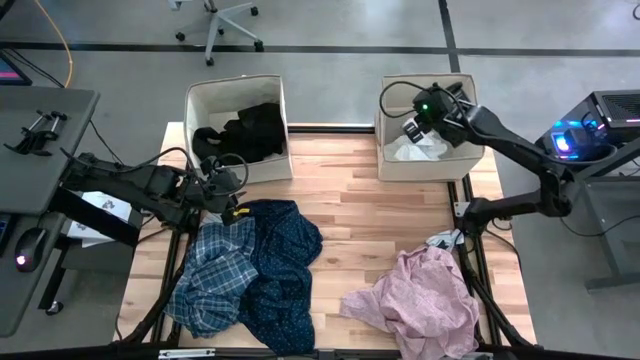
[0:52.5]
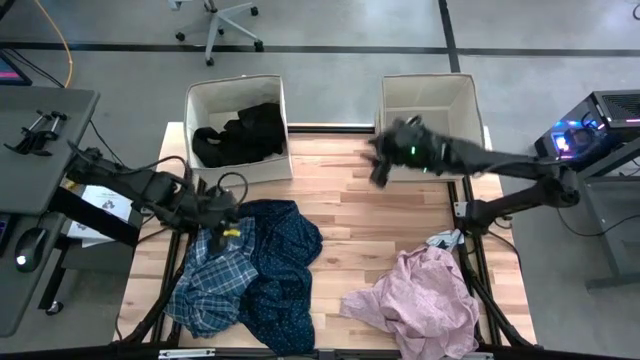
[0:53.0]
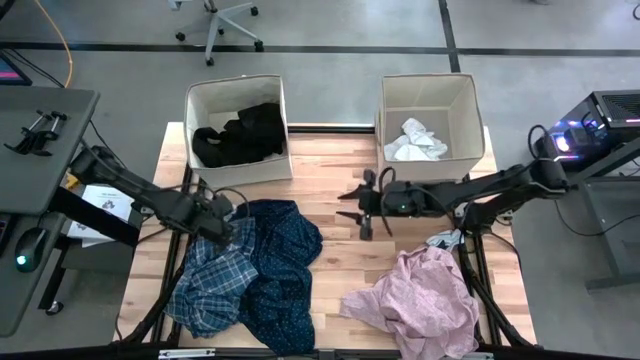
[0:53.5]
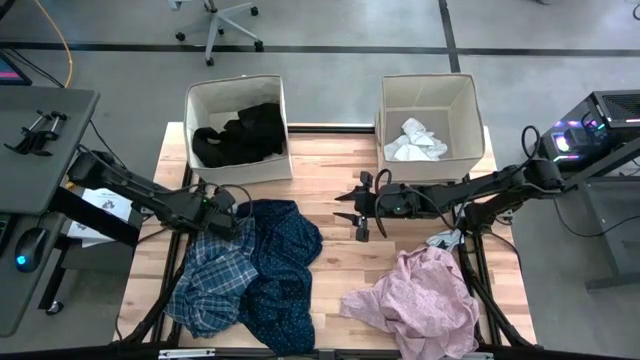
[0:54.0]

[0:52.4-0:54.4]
Task: Sort clothes
Put the left white stripe sock into the right laundry bin

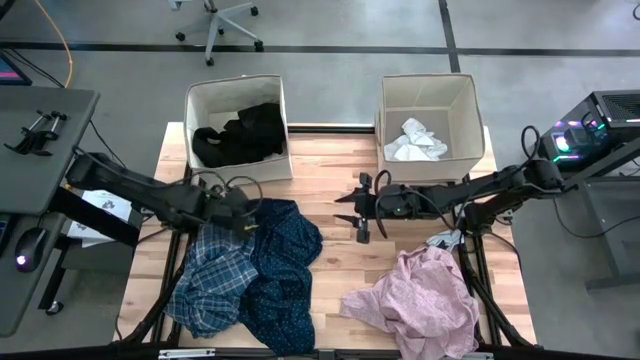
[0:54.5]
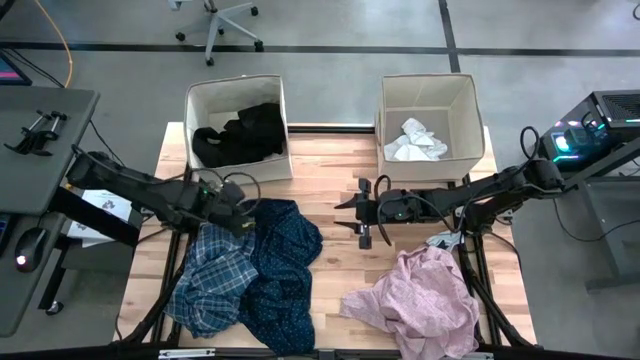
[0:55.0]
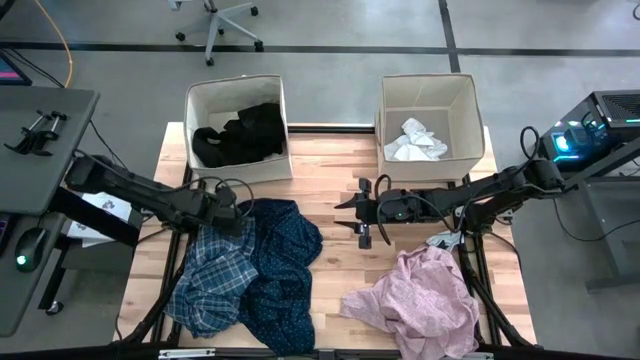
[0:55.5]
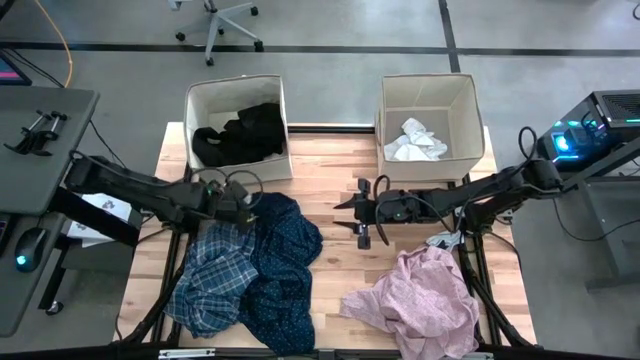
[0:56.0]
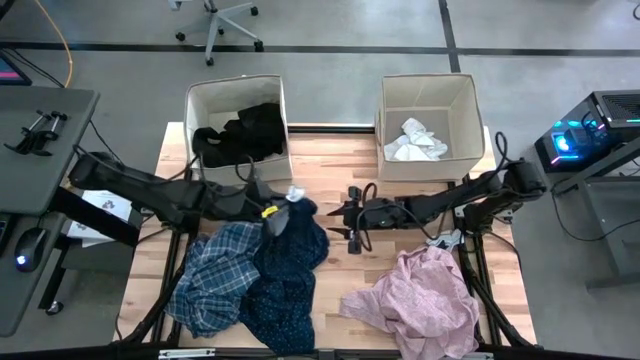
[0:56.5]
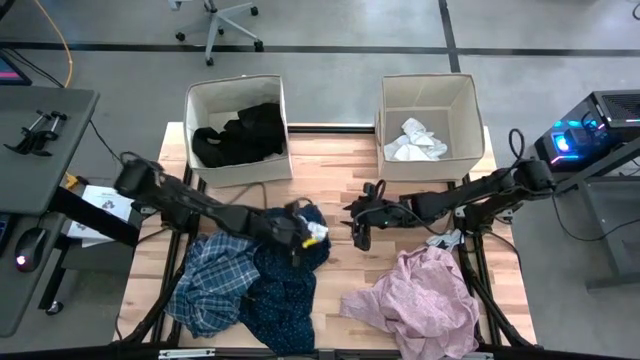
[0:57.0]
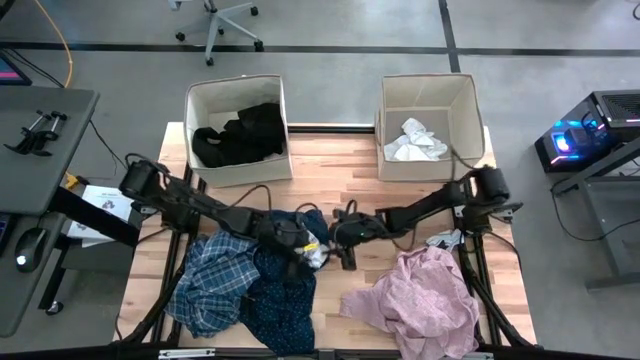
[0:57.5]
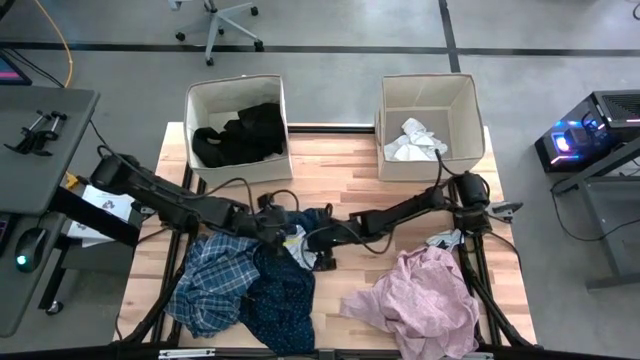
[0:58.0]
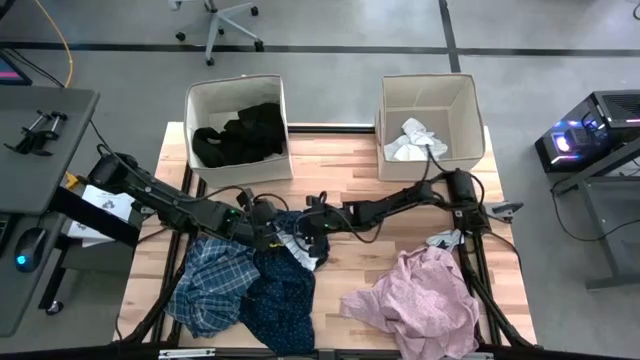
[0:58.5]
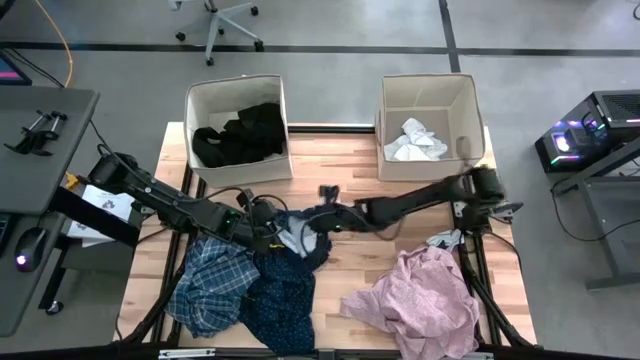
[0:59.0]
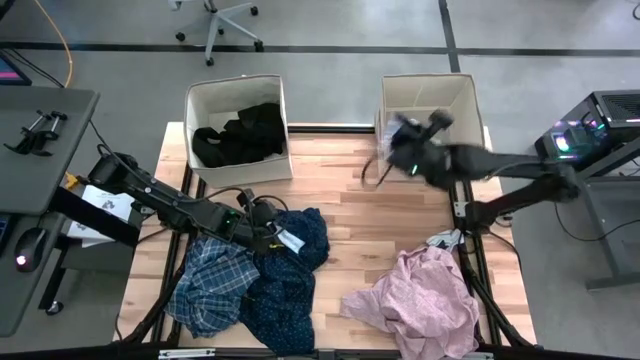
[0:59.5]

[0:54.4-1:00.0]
Put the left white stripe sock into the right laundry bin

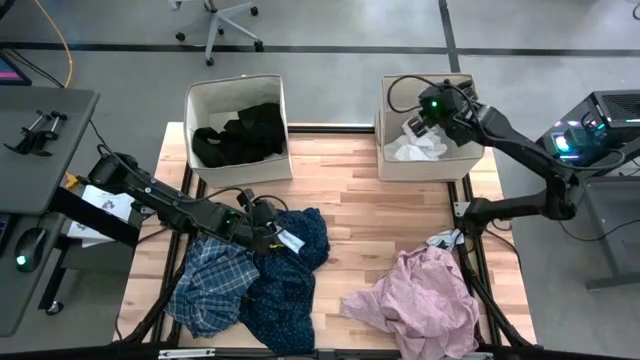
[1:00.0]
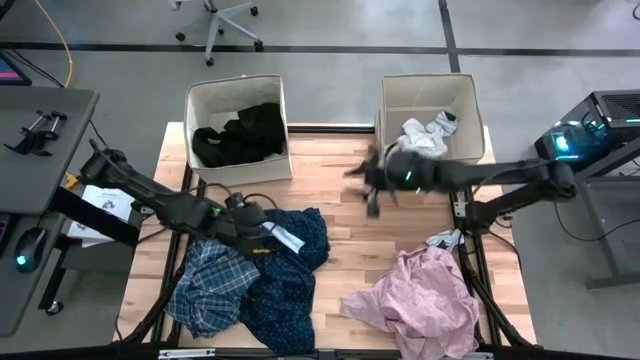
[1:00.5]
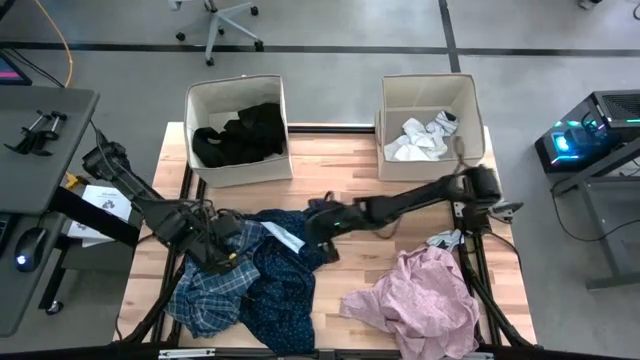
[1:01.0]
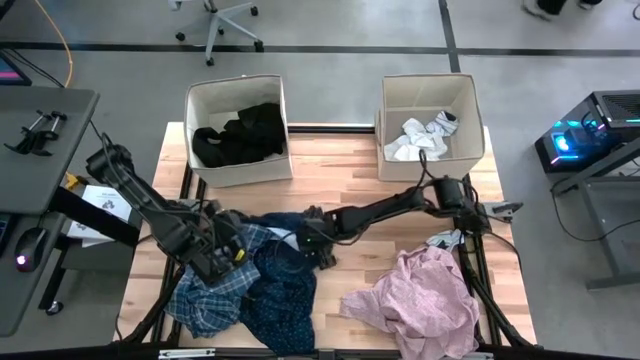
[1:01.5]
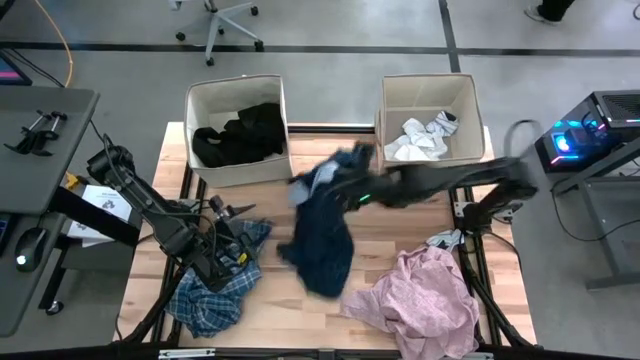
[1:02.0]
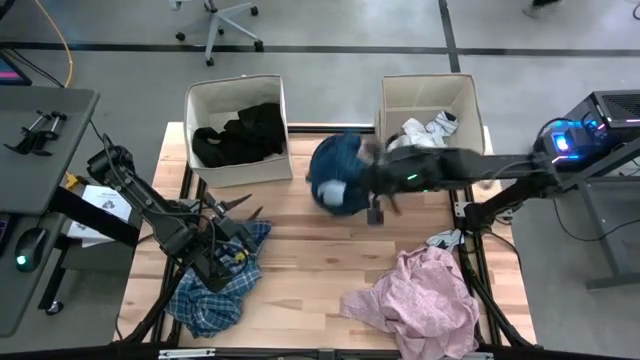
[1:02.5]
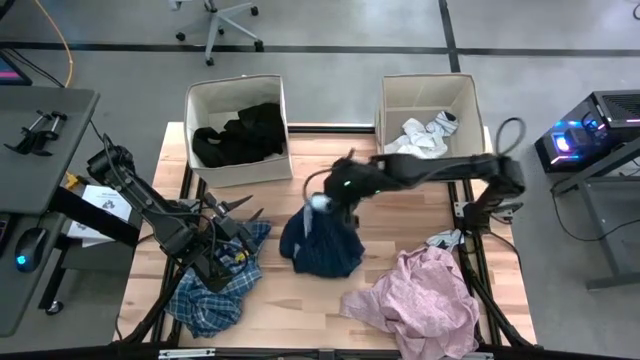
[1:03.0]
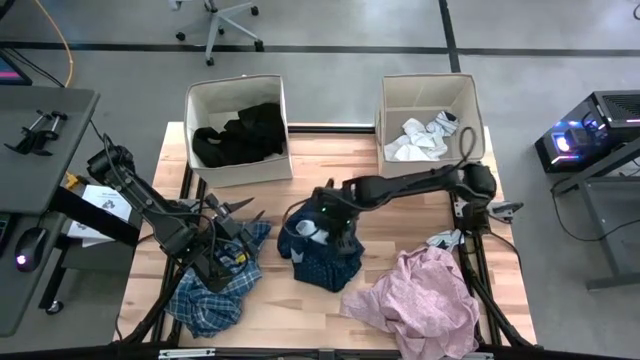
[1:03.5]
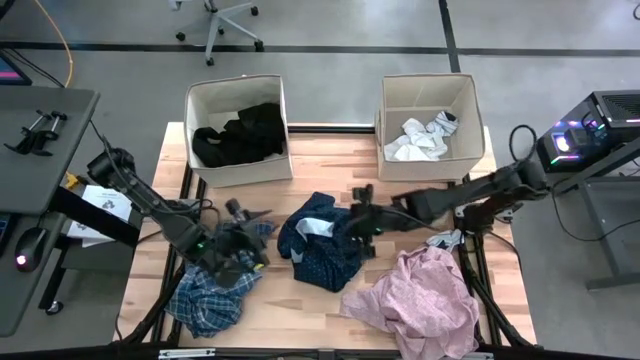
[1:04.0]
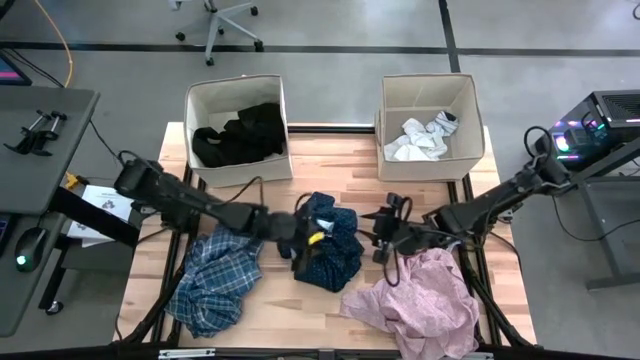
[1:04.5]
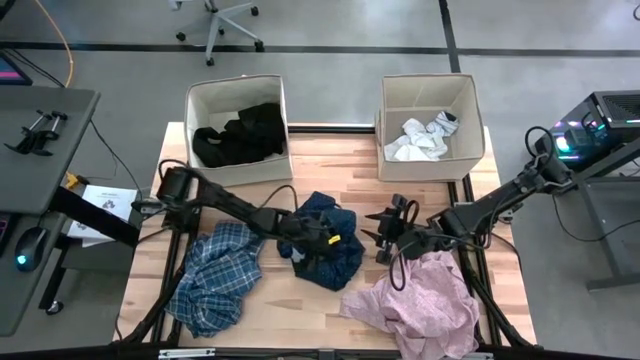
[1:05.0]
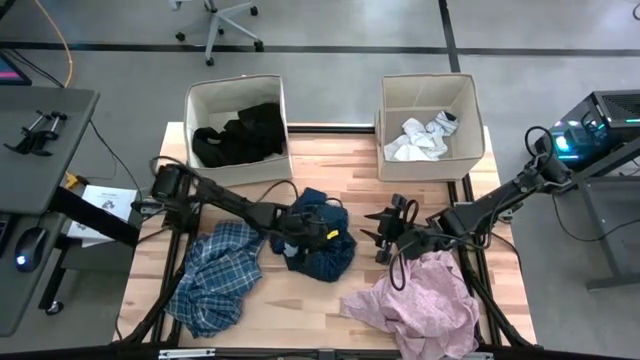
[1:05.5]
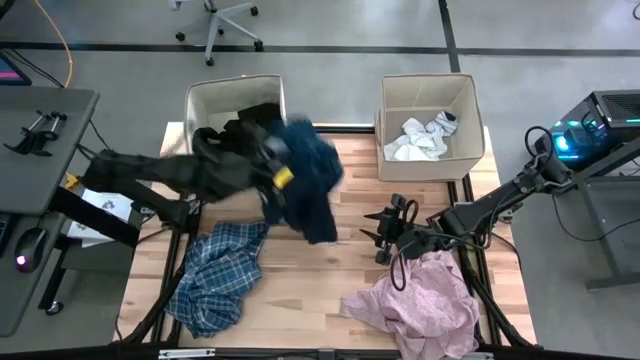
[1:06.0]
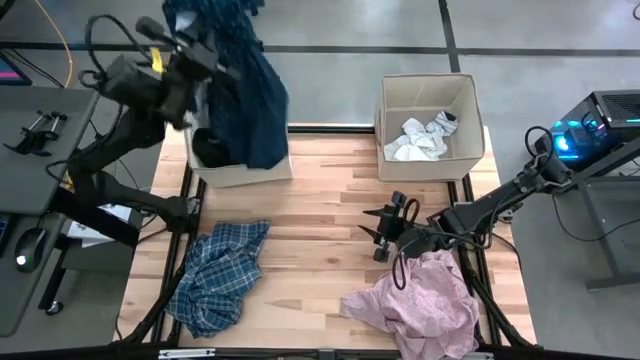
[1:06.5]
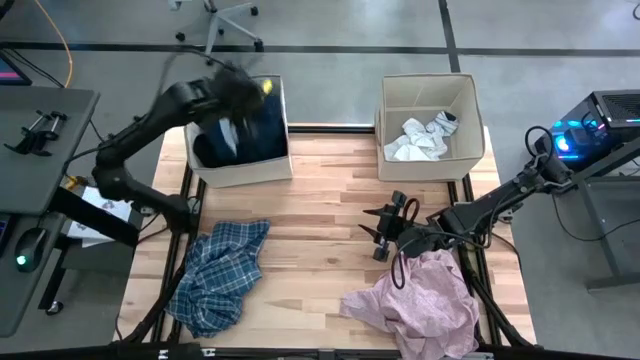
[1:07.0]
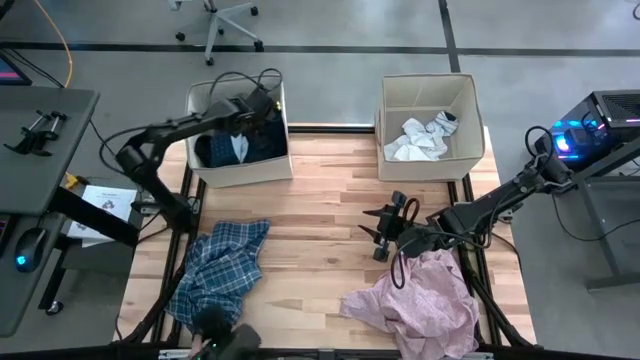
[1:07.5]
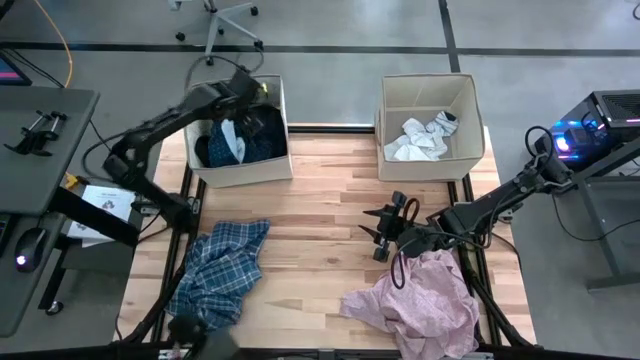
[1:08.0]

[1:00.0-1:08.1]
Put the dark blue shirt into the left laundry bin

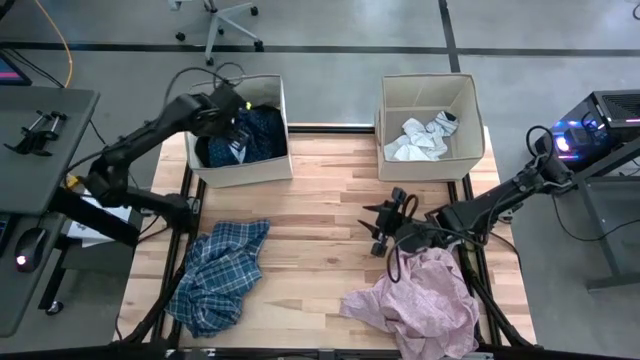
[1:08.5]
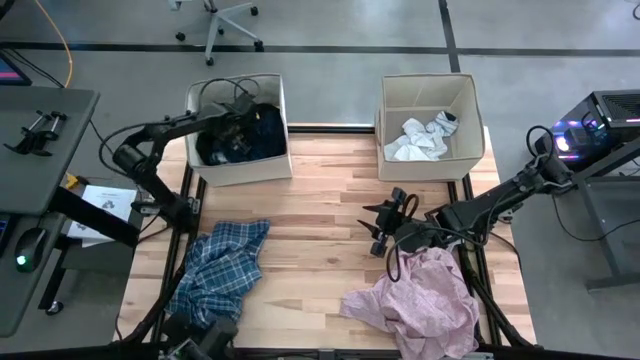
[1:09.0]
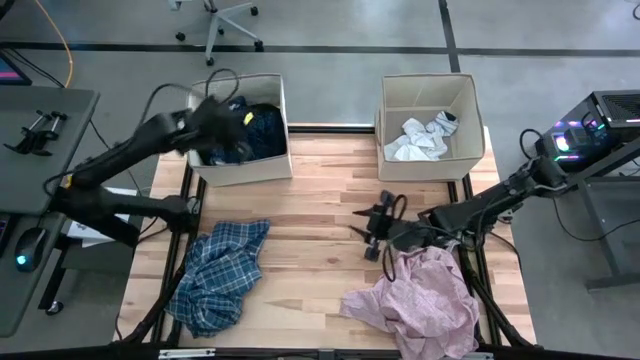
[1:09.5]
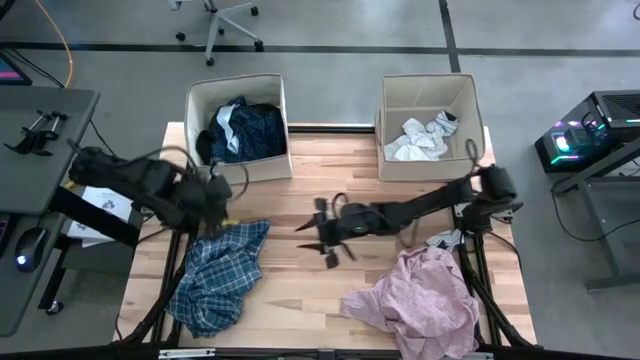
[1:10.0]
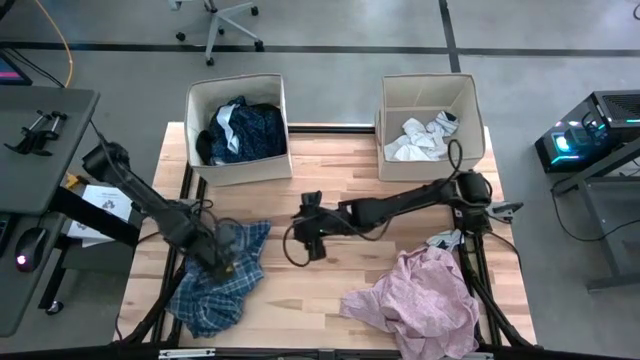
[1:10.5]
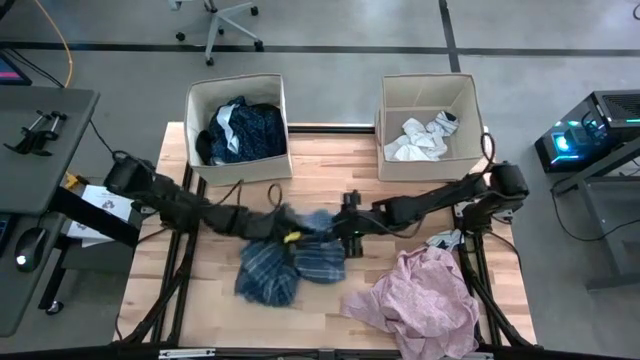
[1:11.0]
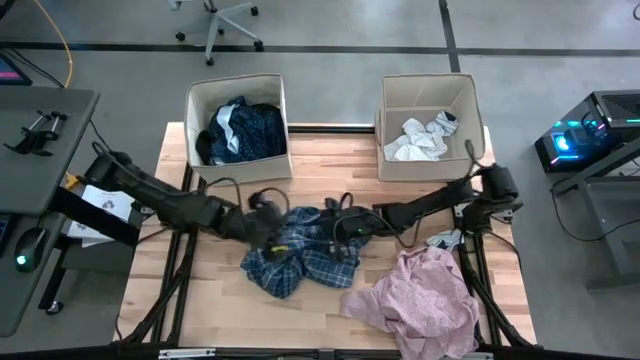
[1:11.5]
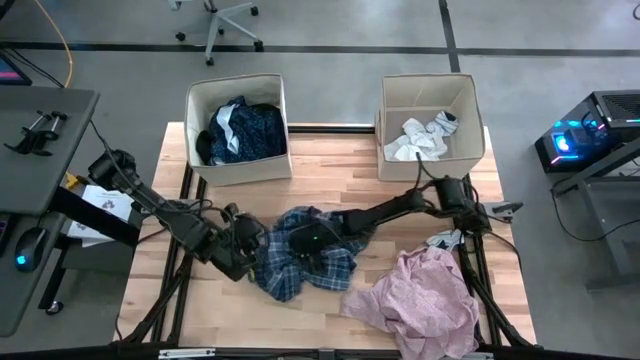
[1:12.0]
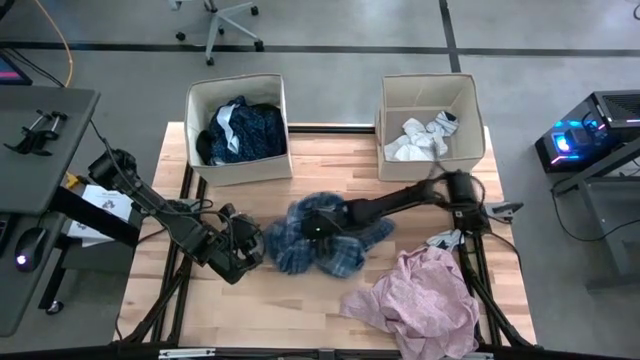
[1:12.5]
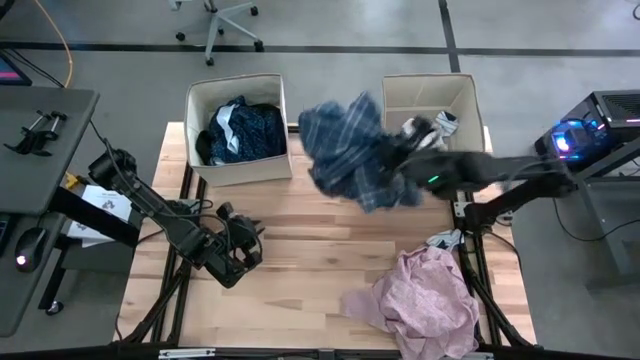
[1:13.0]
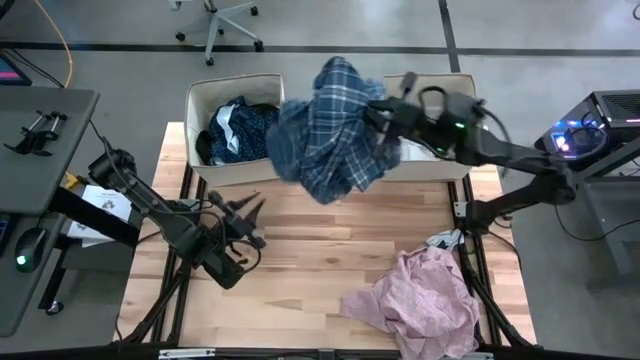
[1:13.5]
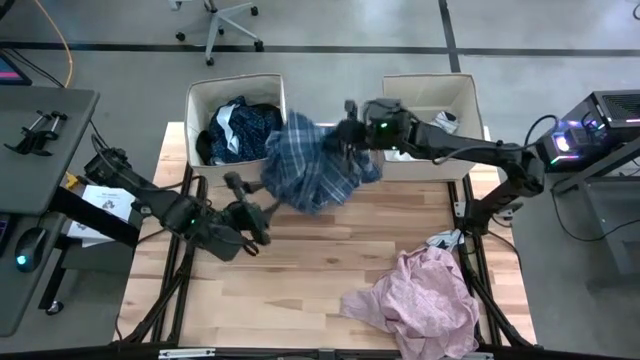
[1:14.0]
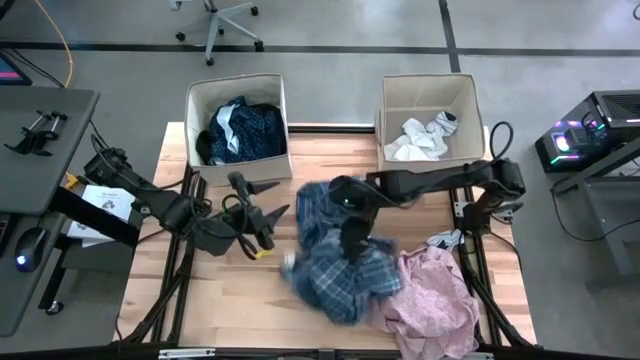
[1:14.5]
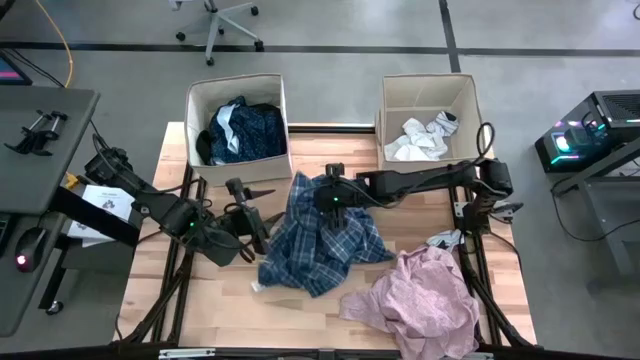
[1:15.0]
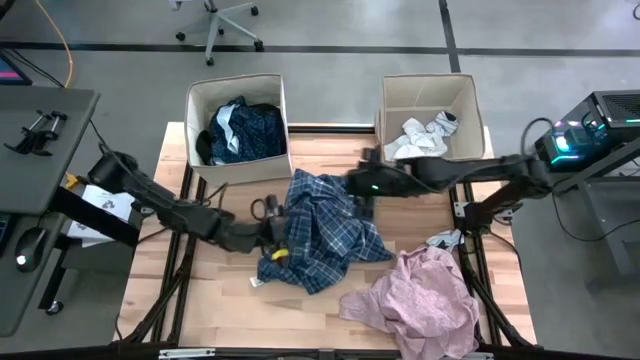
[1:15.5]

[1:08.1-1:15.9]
Put the blue shirt into the left laundry bin
